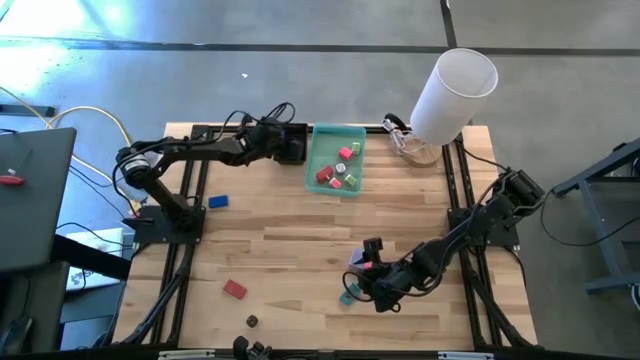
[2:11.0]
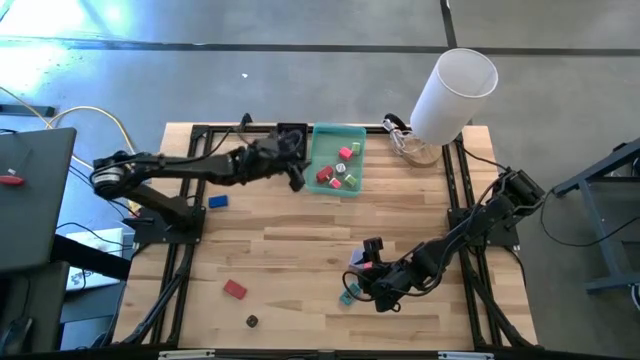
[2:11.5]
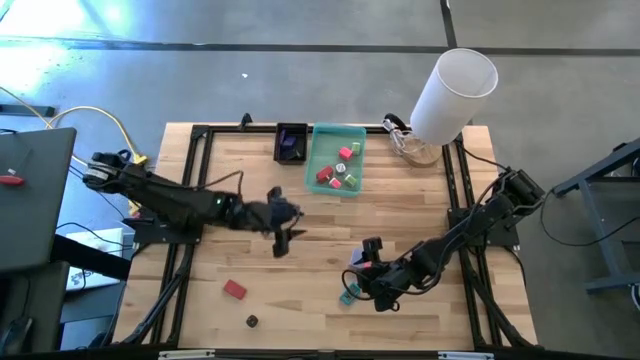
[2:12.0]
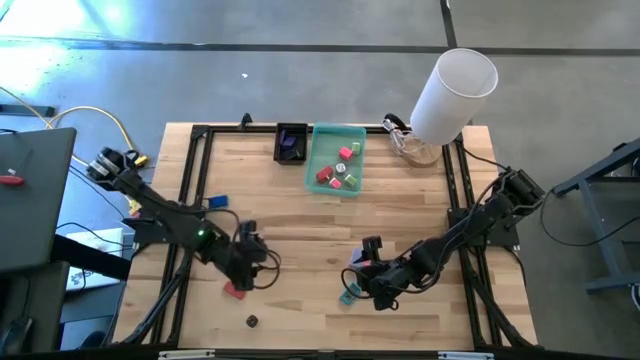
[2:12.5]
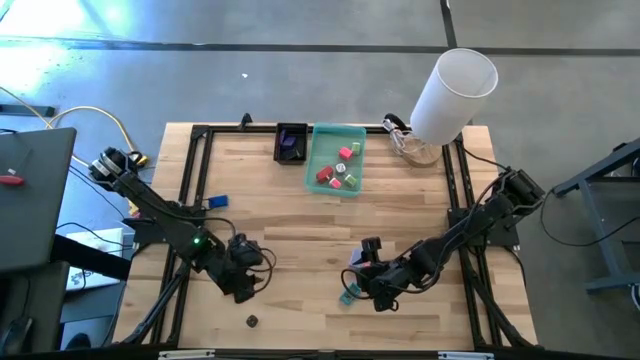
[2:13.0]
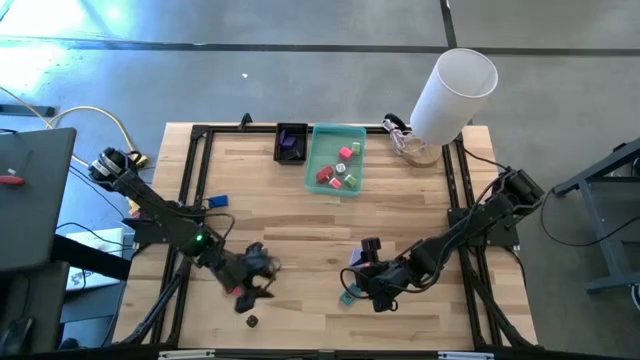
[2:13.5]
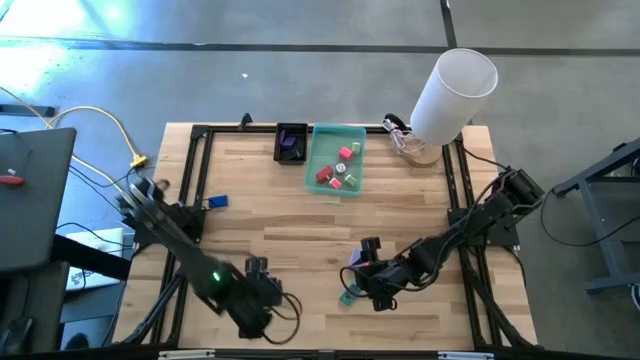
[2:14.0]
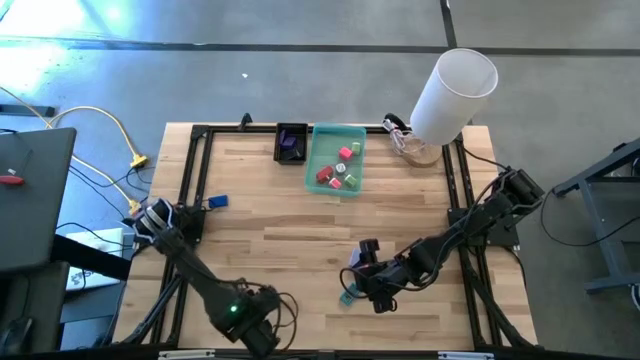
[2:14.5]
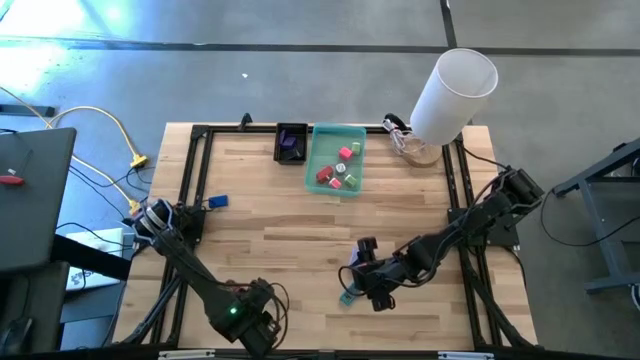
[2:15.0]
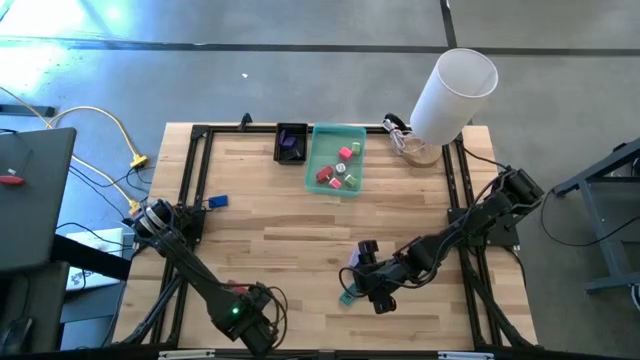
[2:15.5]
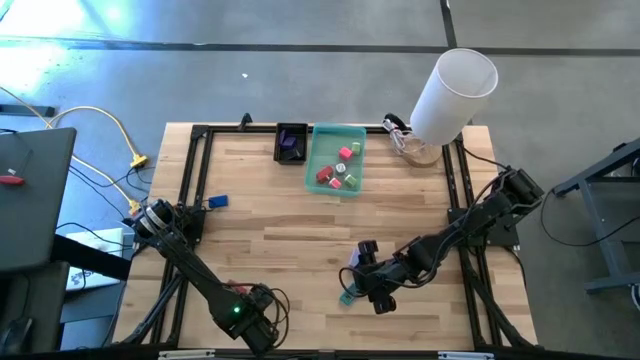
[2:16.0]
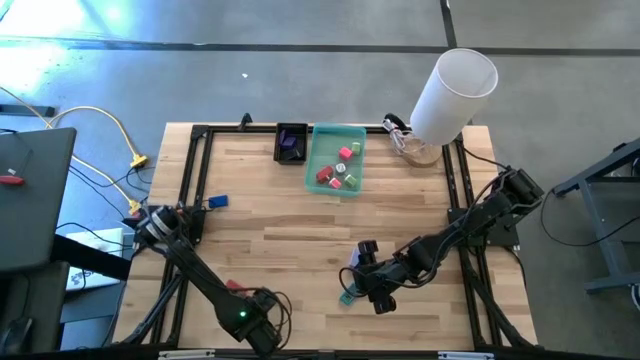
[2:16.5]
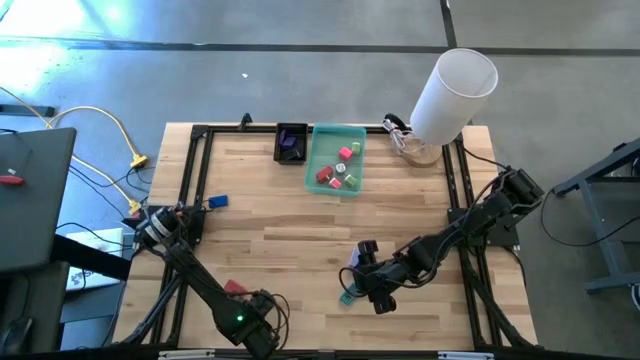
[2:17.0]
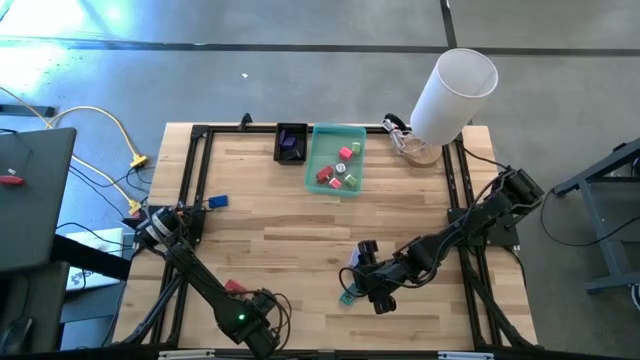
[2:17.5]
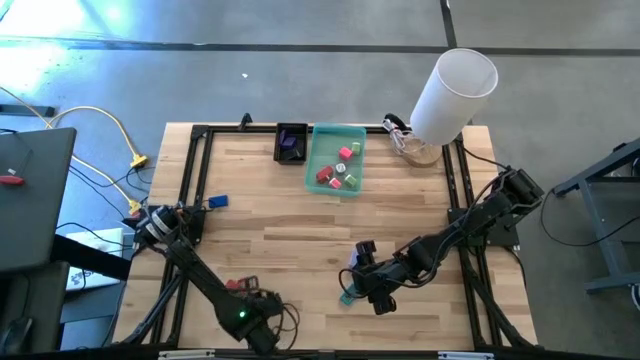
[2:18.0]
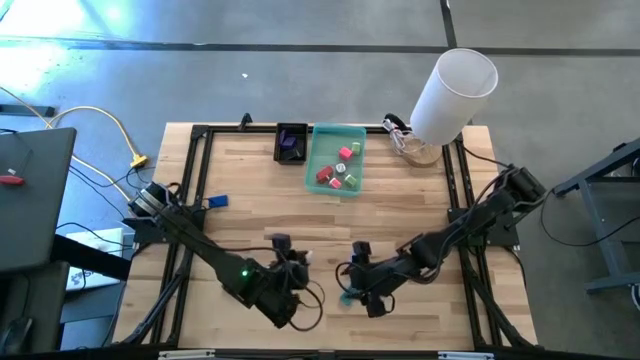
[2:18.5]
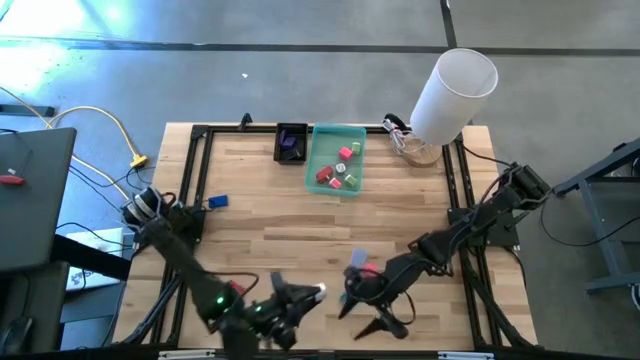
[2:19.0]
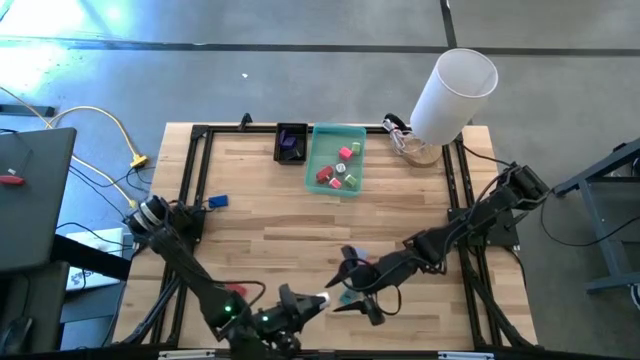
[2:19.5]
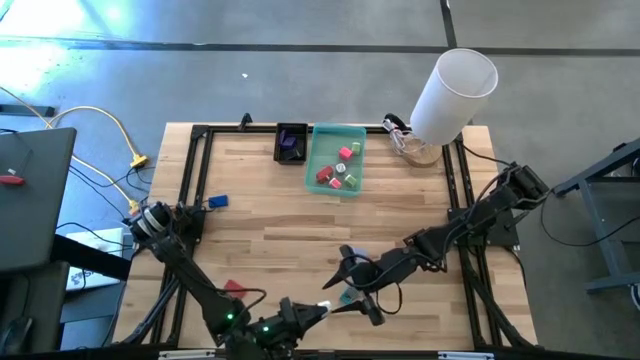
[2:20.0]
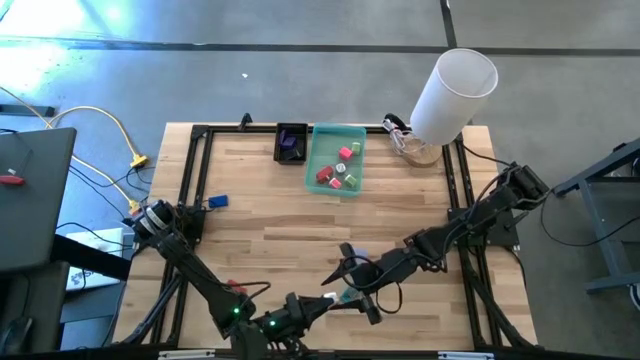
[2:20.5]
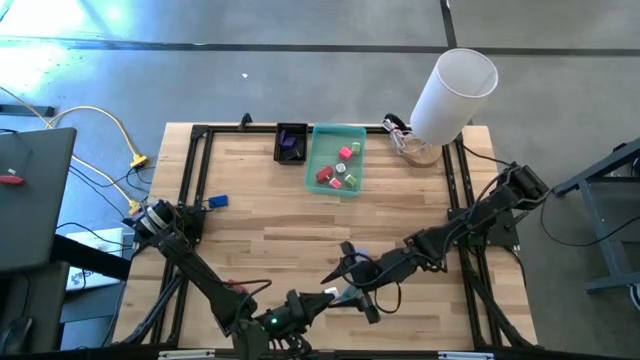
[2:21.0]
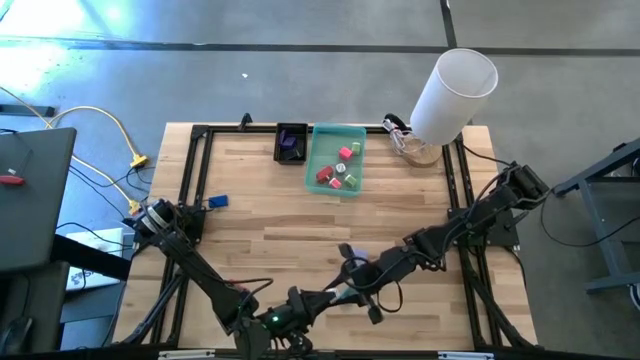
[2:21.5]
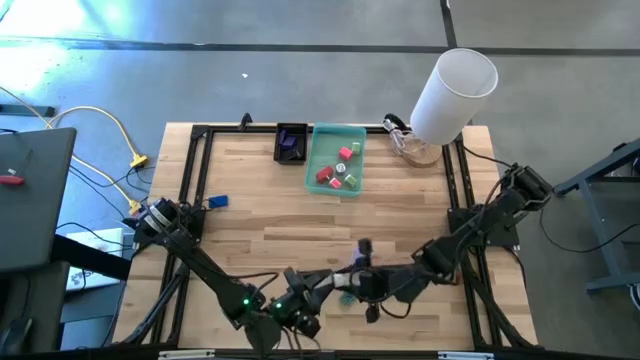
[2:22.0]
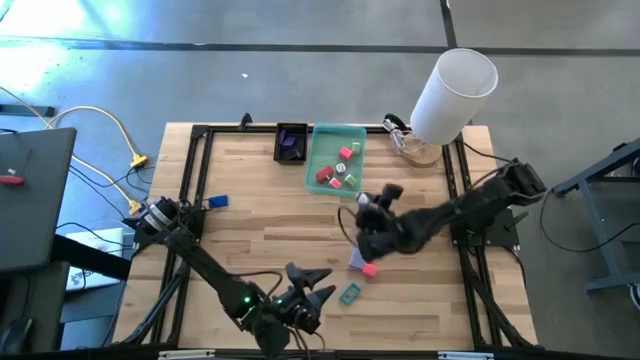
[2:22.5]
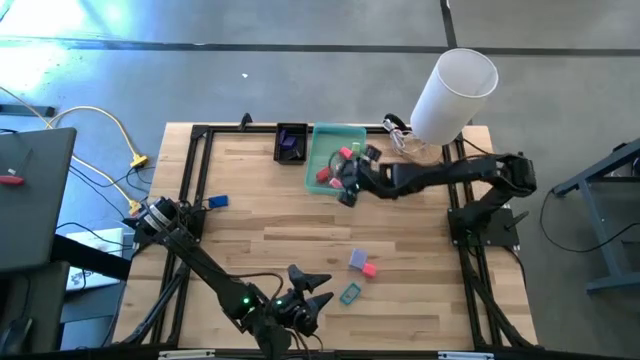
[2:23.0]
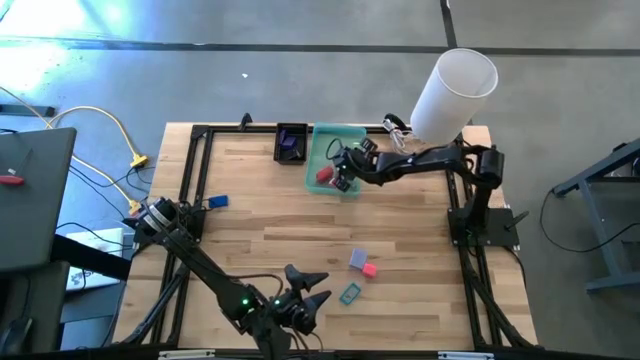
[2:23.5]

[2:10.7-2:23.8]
Task: Pick & Place Office items
Put the white charger adapter into the green bin

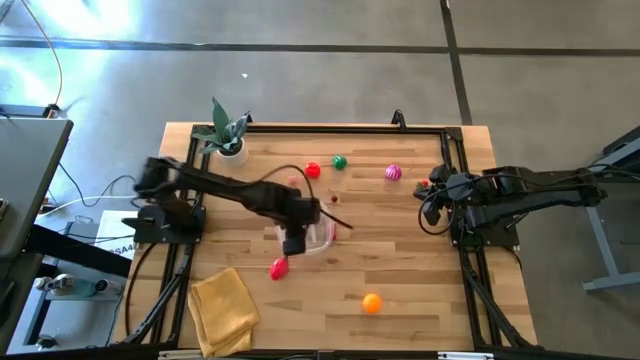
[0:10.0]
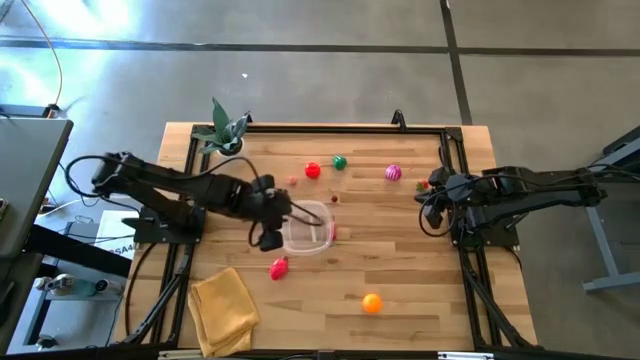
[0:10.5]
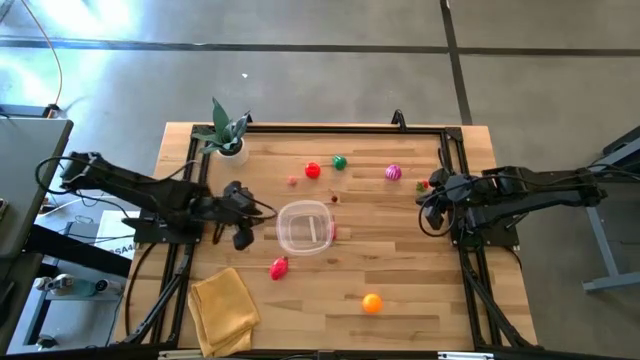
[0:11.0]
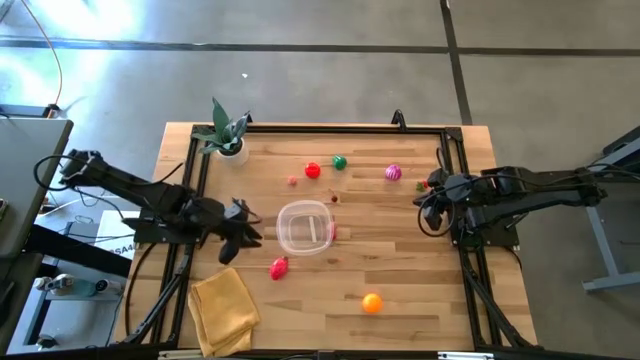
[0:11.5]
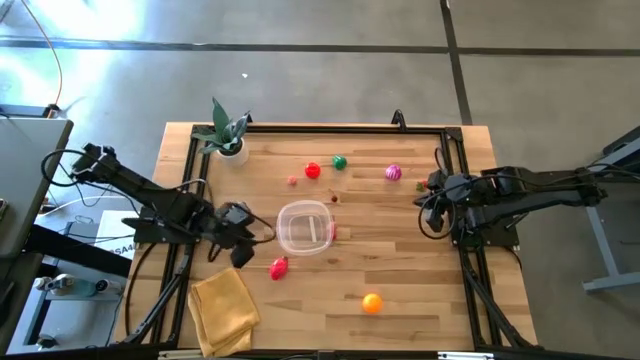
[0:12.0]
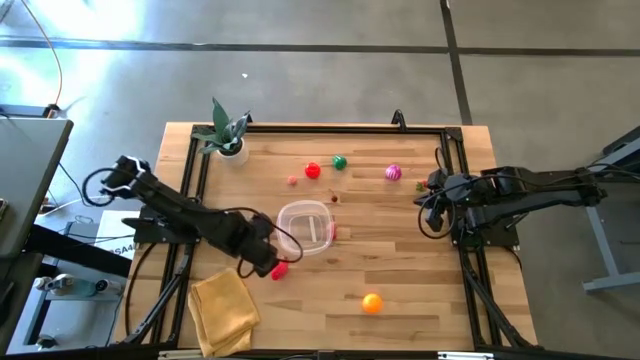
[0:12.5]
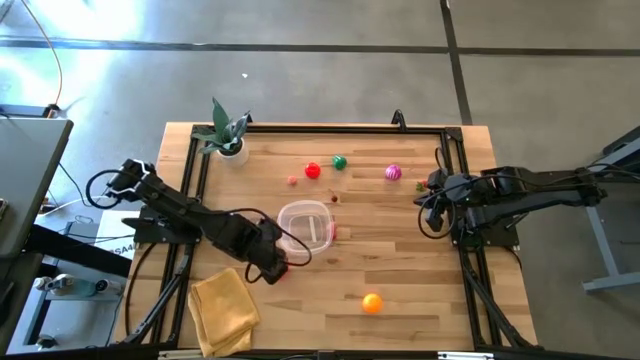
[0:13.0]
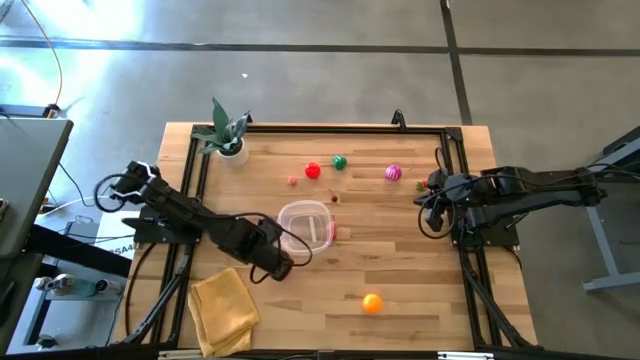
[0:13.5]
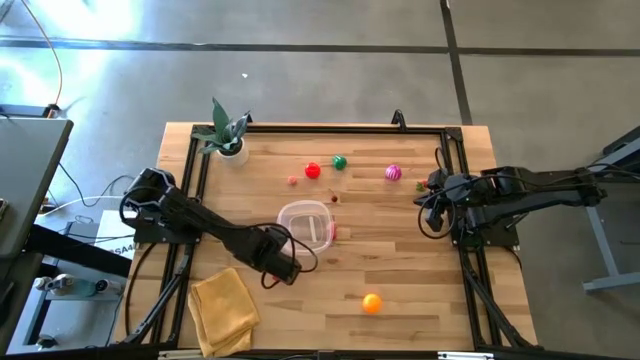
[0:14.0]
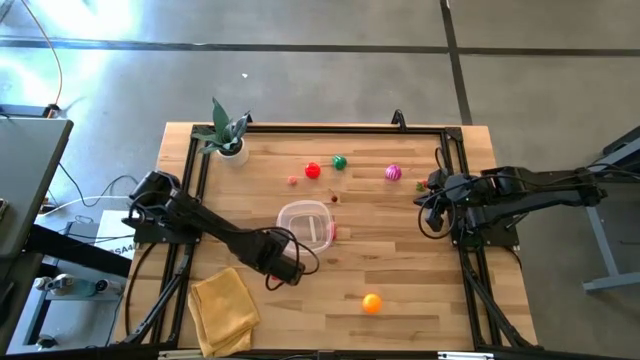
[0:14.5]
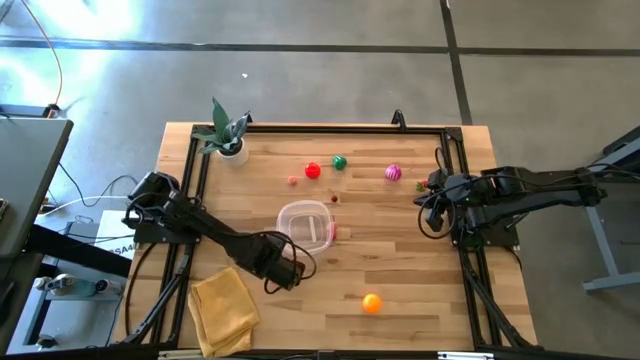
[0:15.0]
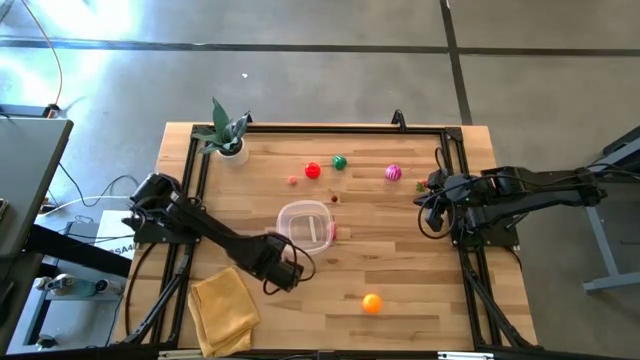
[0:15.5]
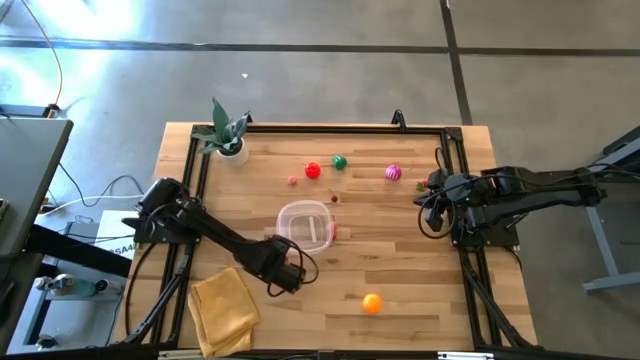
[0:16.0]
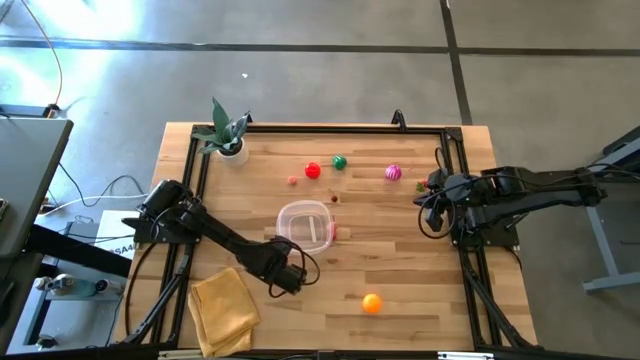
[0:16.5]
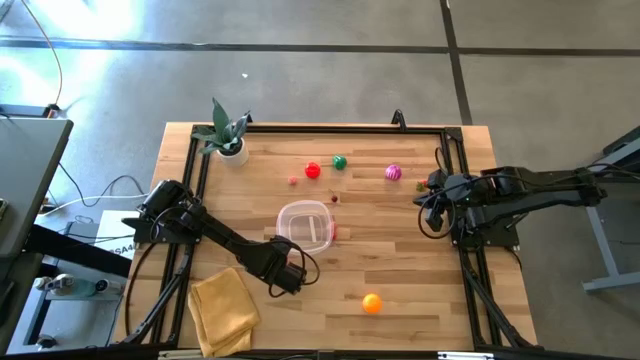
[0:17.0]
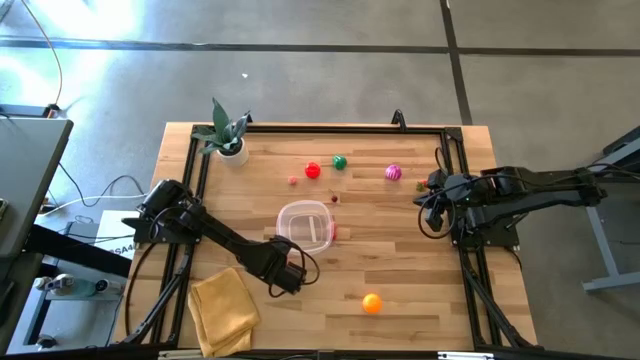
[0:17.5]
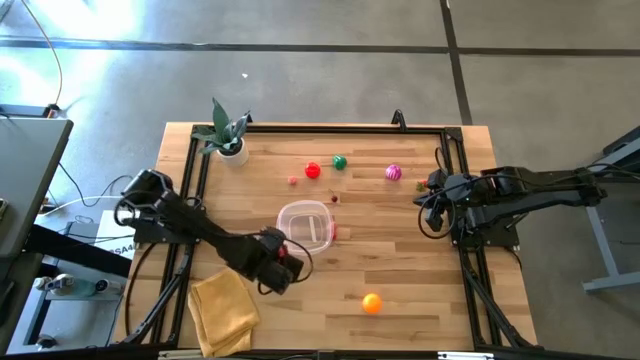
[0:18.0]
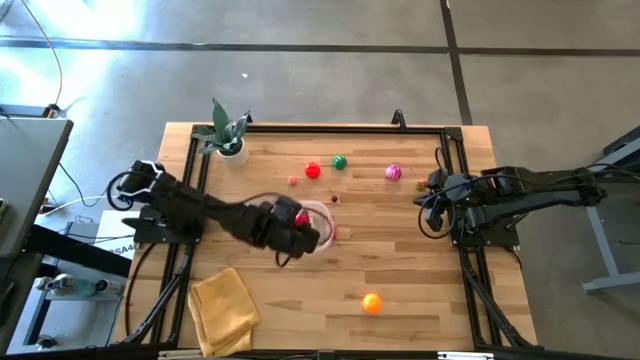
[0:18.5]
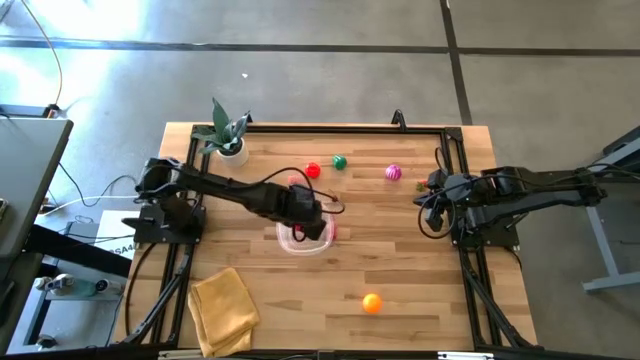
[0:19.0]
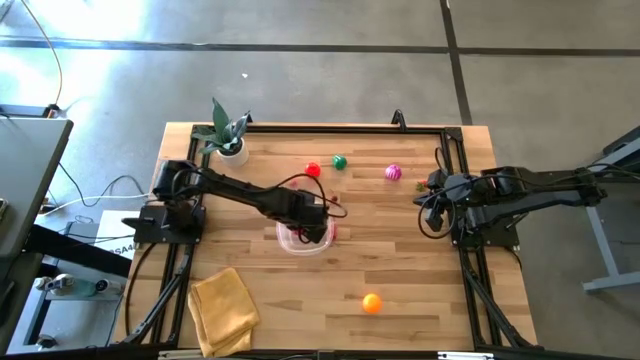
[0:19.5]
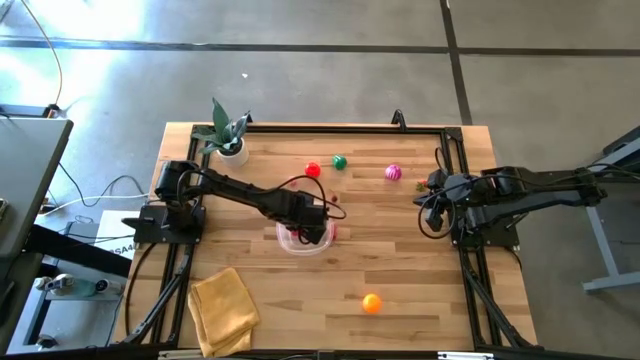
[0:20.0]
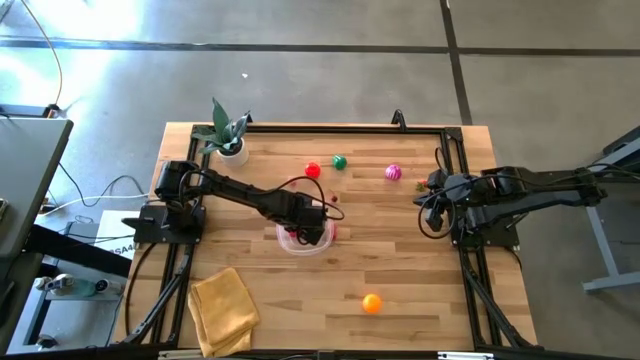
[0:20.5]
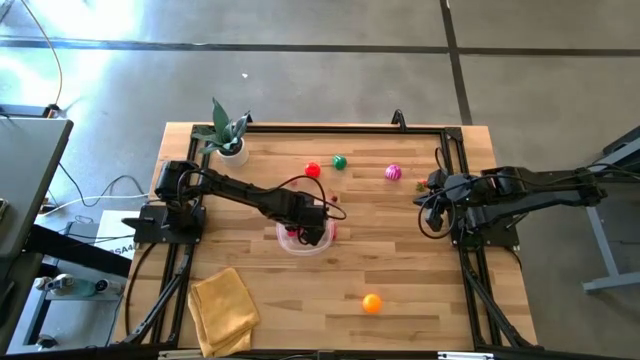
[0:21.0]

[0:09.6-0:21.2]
Task: Pick and placing Produce into tupperware
Put the red dragon fruit into the transparent container
